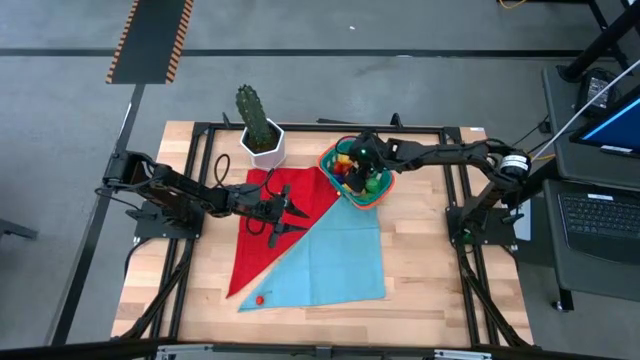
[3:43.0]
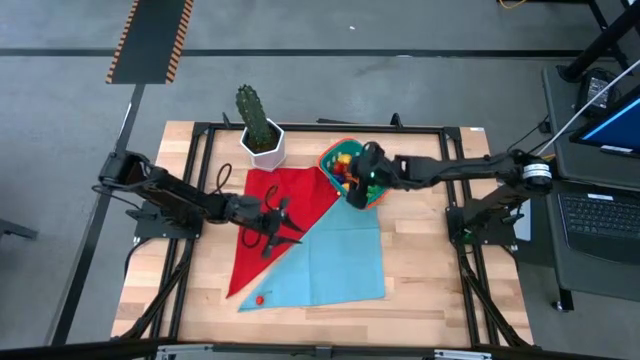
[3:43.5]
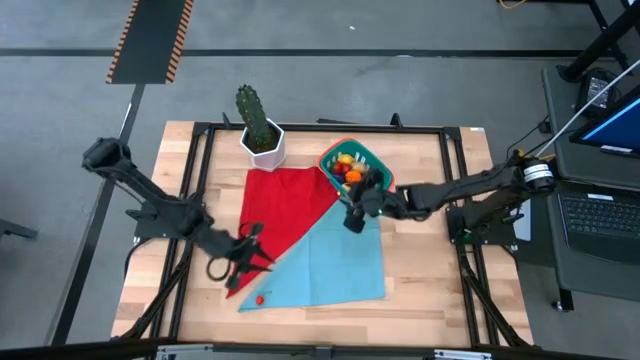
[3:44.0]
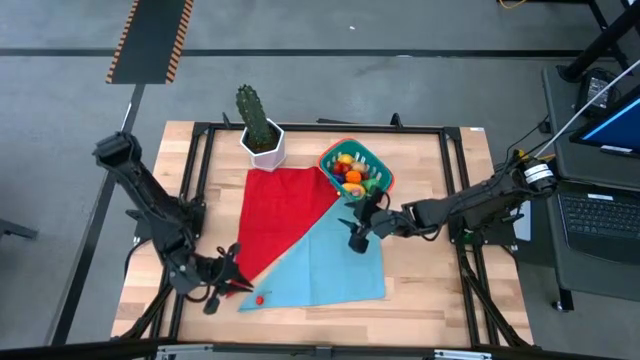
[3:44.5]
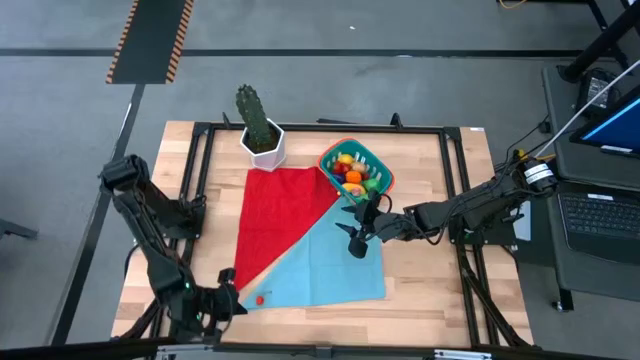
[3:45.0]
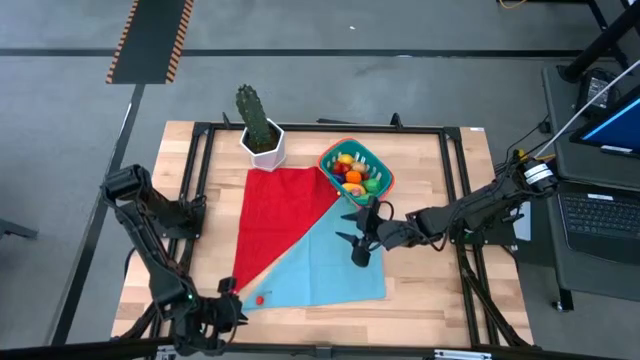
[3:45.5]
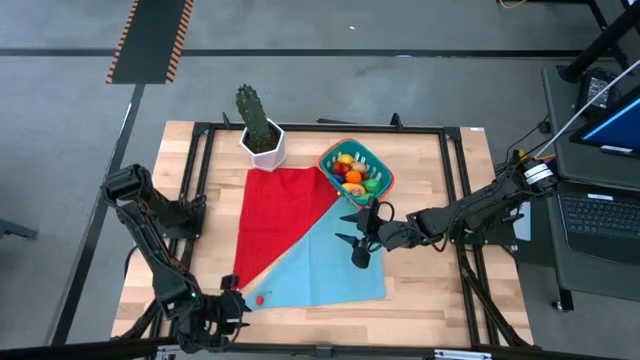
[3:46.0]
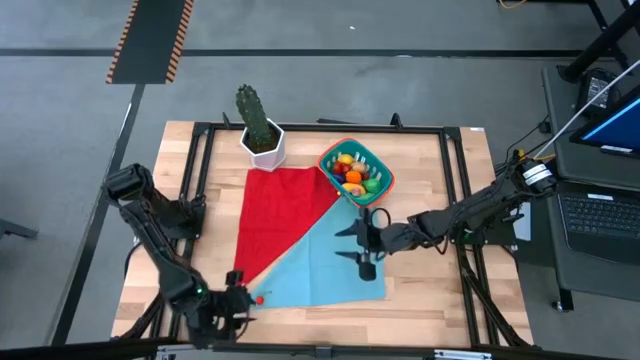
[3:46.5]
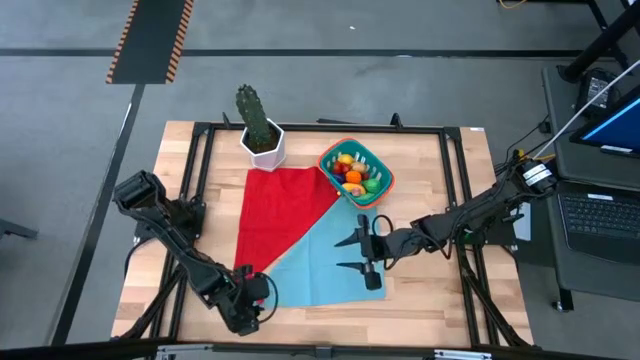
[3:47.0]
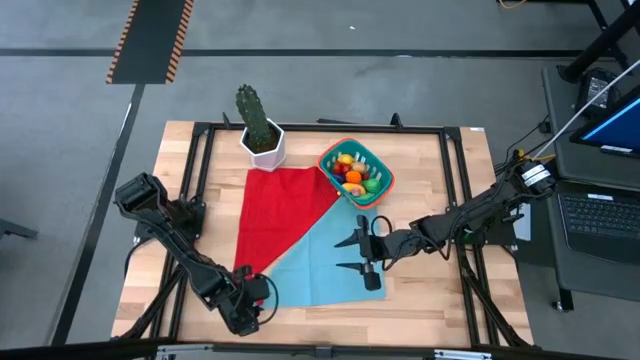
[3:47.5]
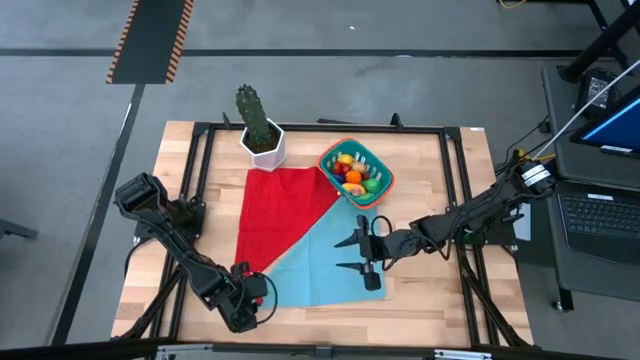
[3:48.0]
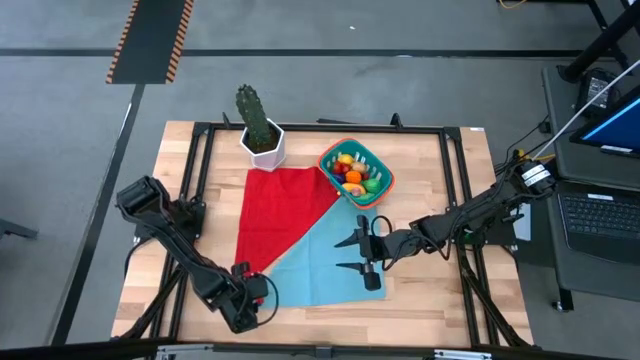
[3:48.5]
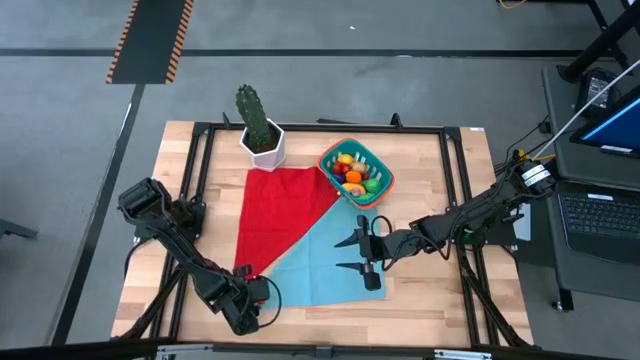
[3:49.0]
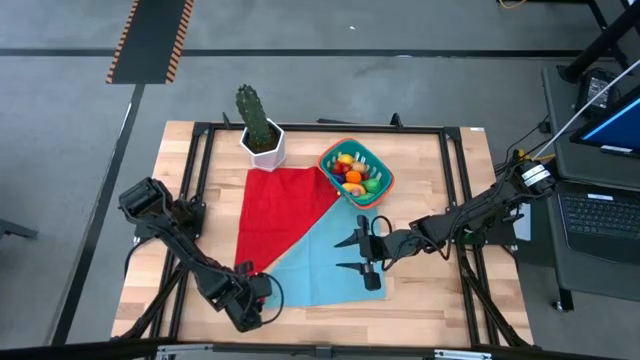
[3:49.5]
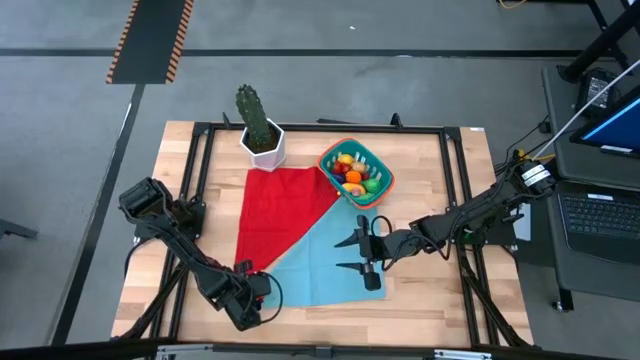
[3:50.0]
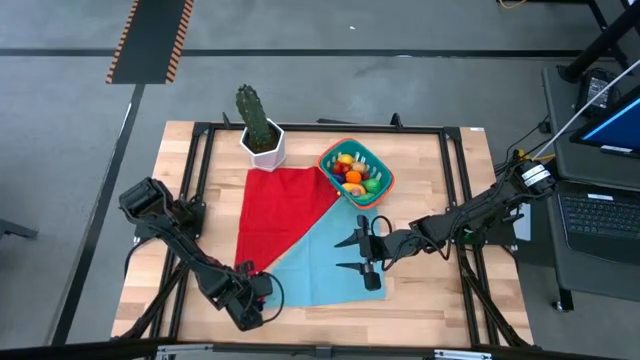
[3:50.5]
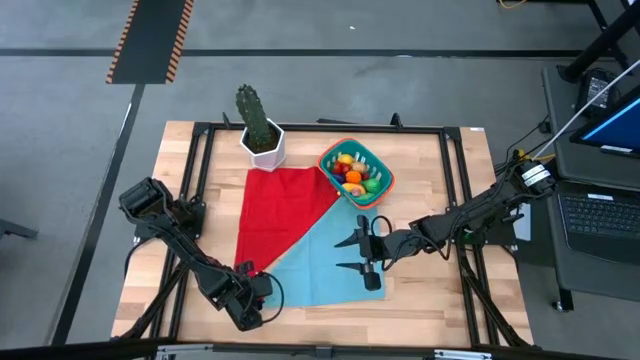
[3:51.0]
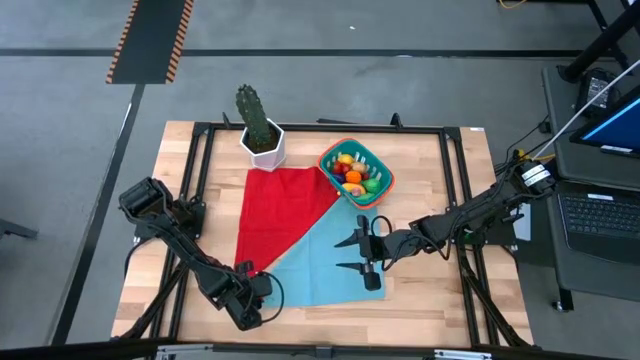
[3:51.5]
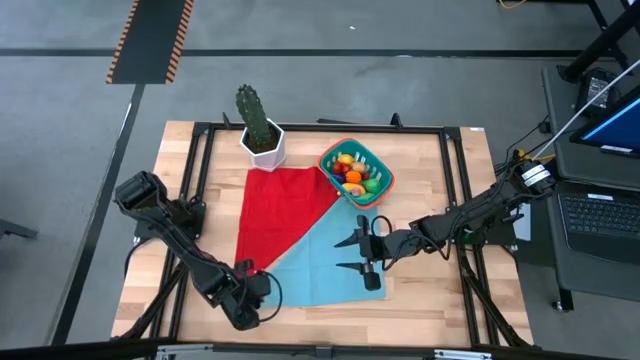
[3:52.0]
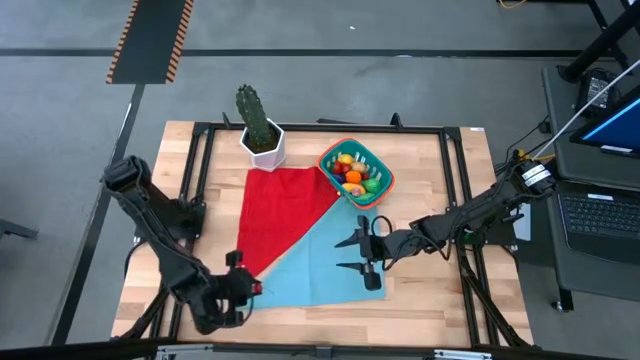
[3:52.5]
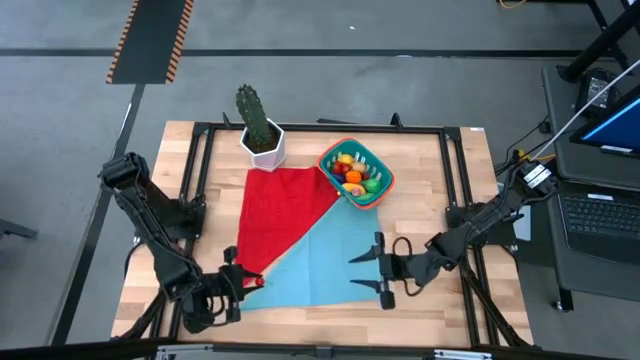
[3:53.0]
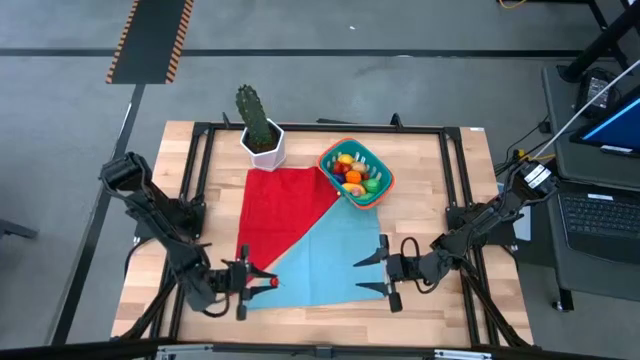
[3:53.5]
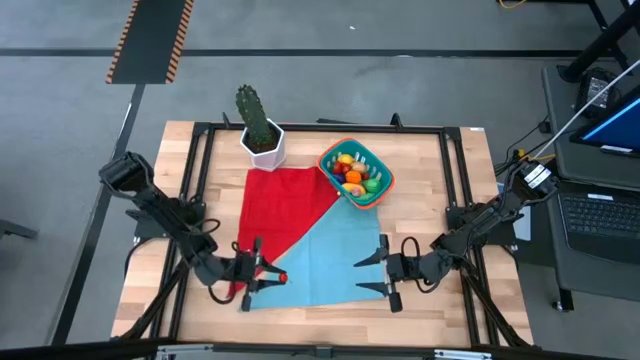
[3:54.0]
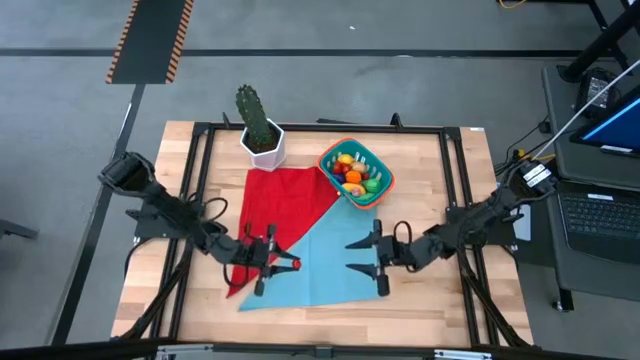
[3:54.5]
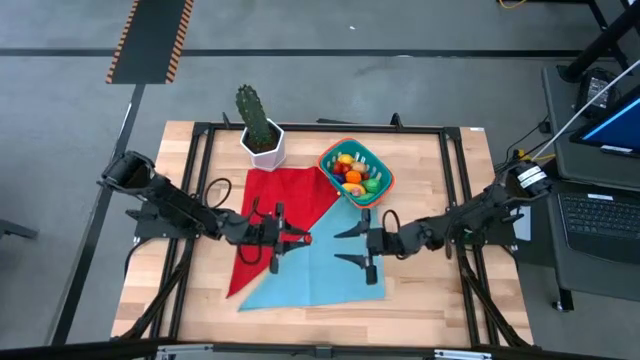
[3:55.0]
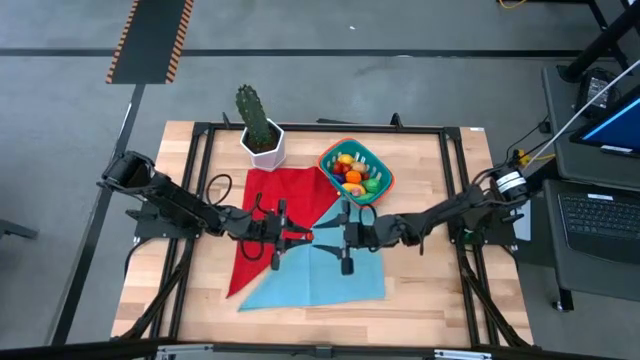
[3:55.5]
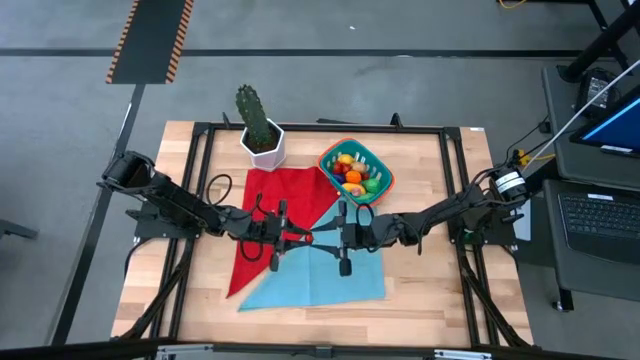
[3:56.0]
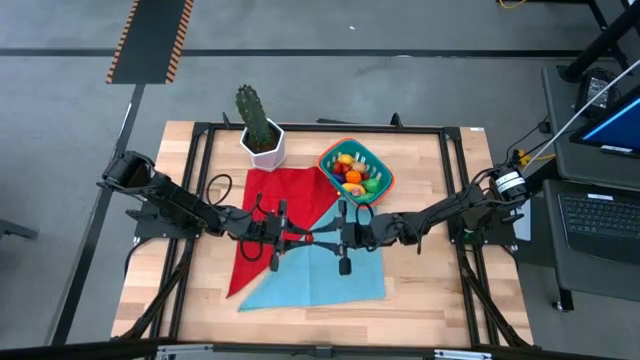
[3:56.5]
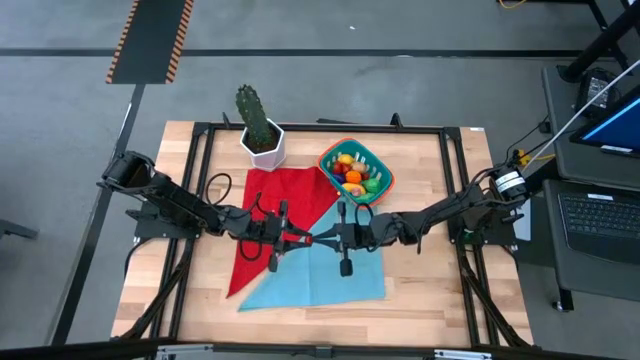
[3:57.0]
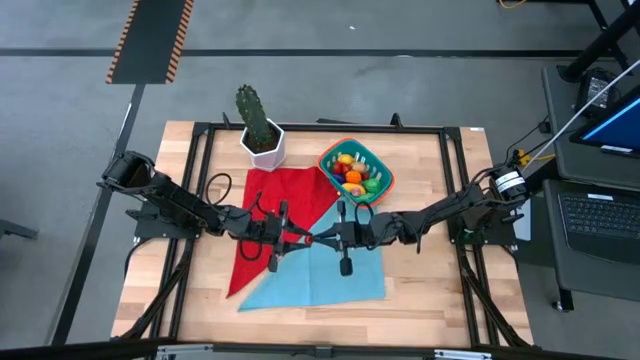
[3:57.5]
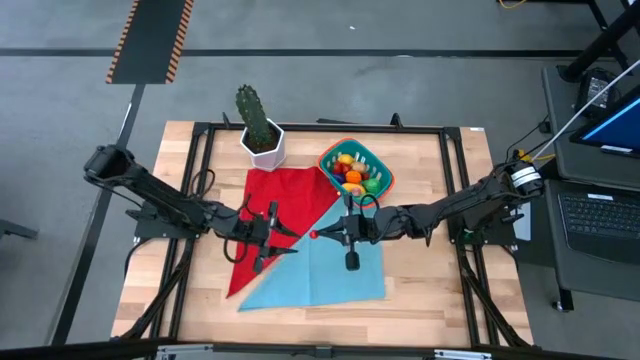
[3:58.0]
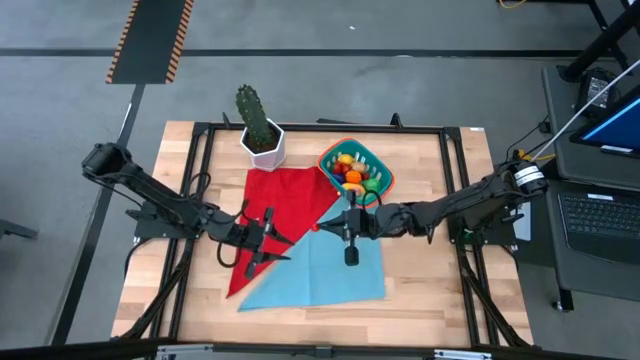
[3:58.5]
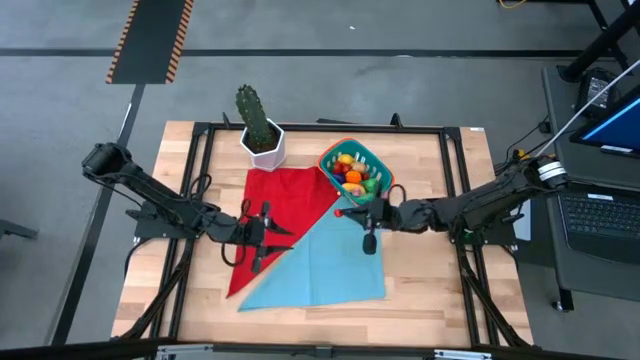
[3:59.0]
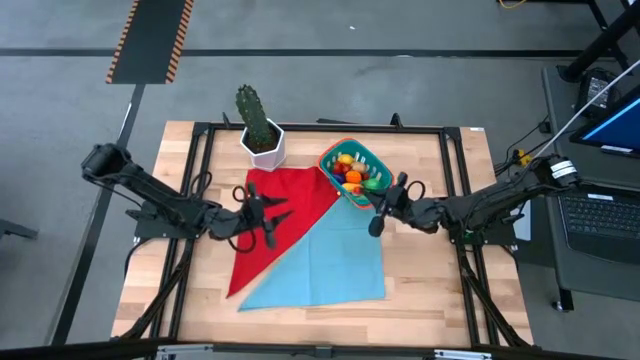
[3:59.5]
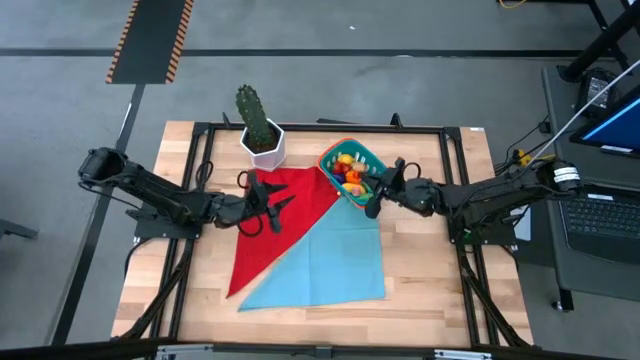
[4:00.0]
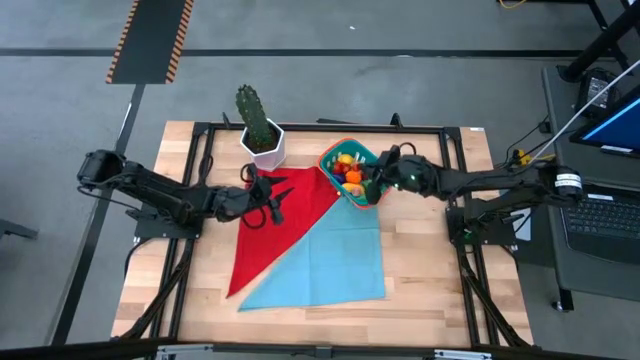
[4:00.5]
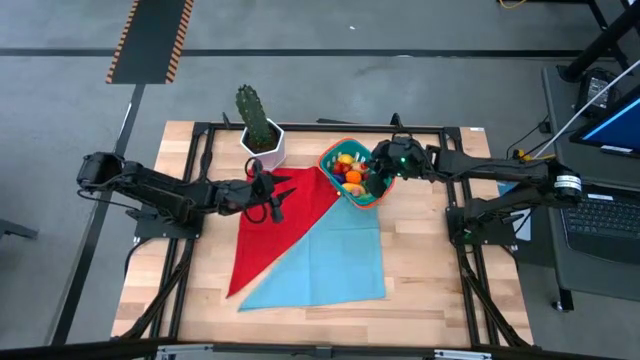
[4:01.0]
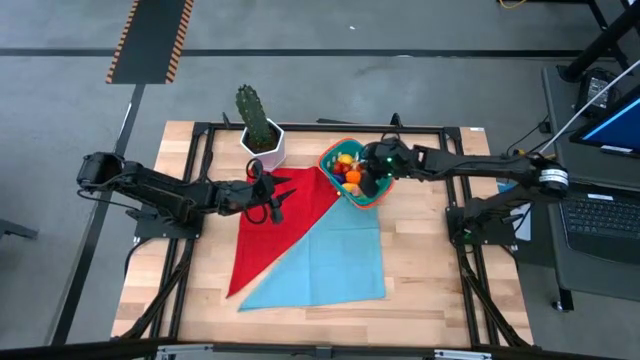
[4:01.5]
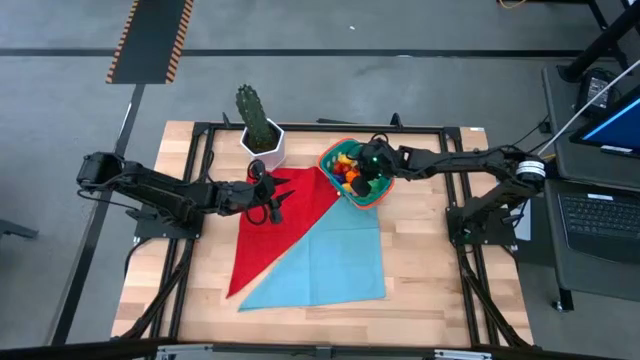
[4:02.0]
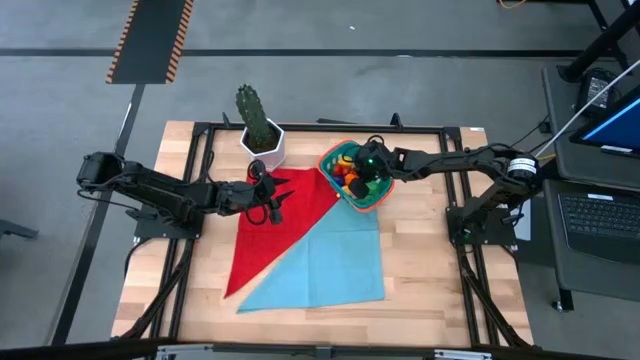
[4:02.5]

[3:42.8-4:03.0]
Task: Build produce basket
Put the red cherry into the blue basket

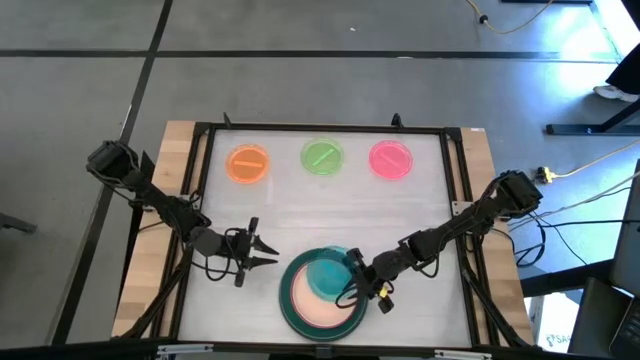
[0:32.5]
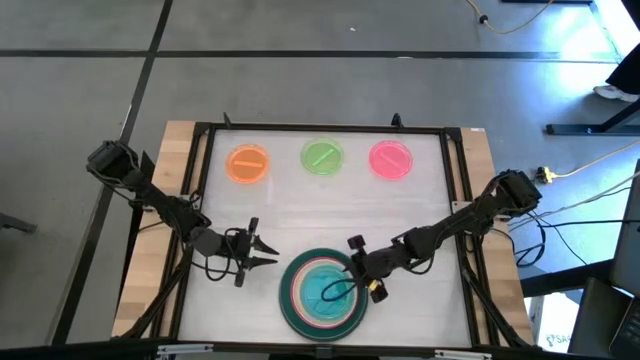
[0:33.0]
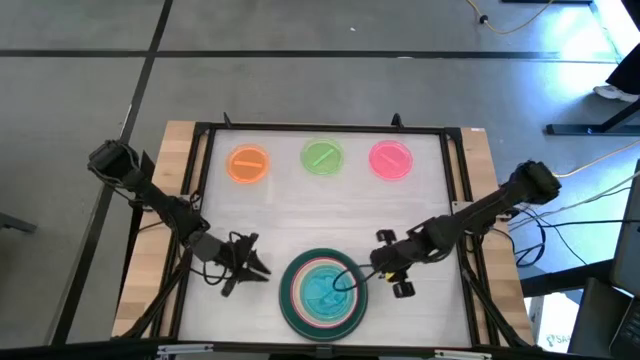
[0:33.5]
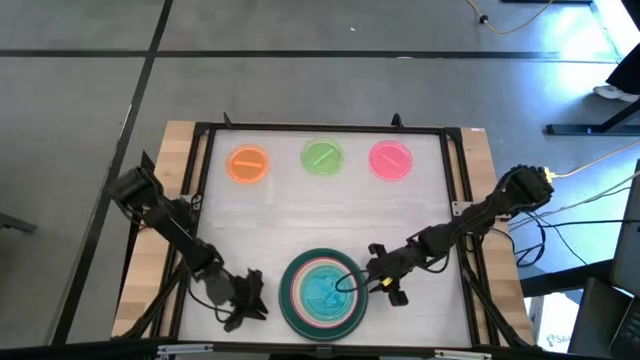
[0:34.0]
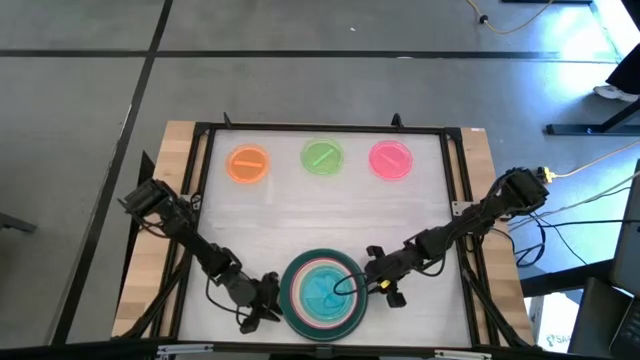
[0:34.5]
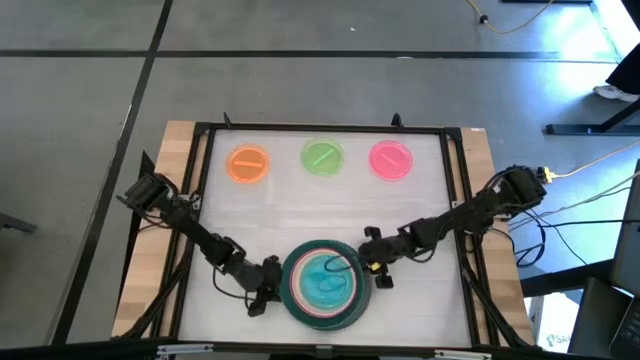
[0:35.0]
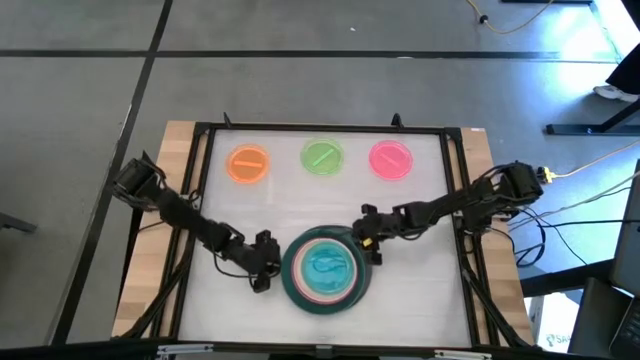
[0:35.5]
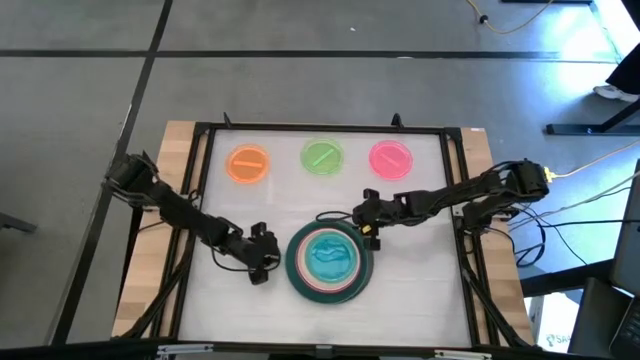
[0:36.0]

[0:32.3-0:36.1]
Task: Stack plastic plates
Adjust the stacked plates
